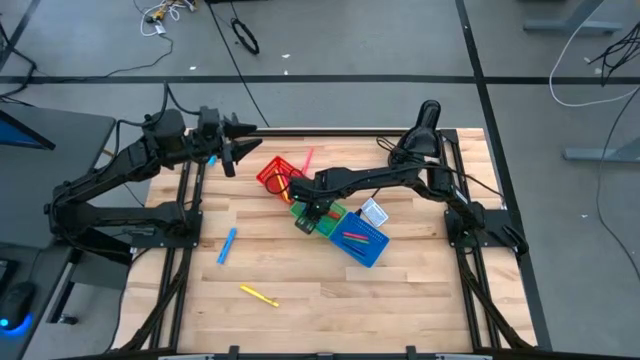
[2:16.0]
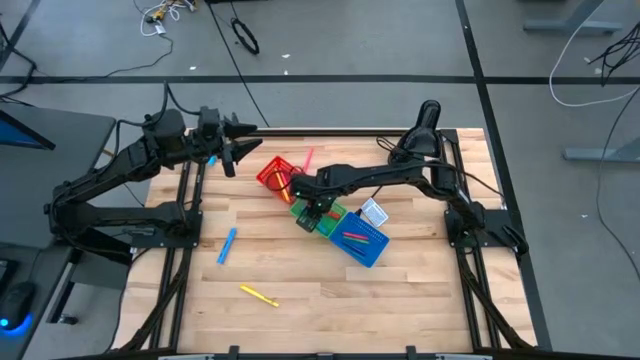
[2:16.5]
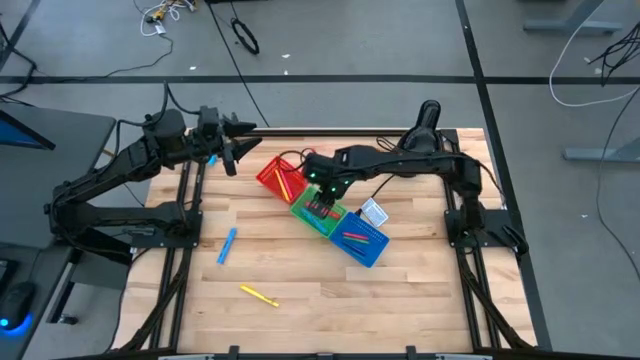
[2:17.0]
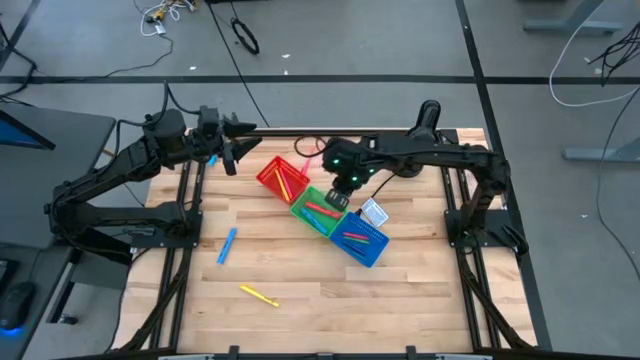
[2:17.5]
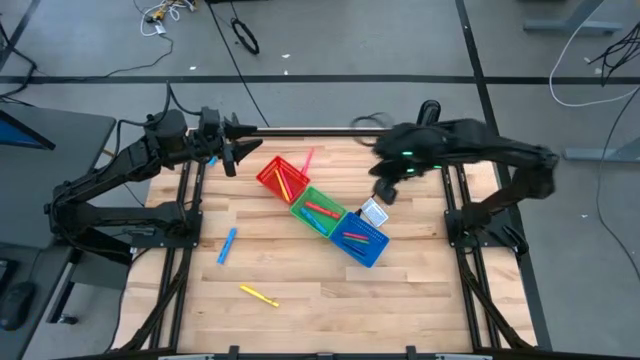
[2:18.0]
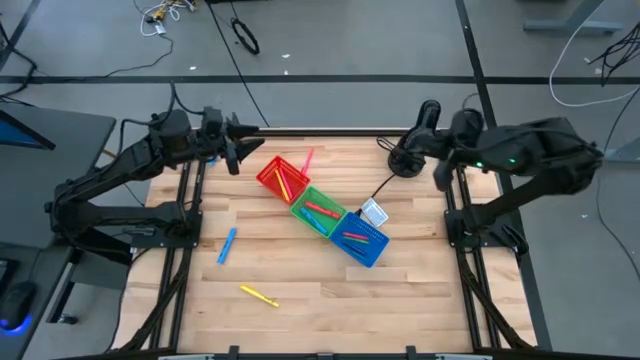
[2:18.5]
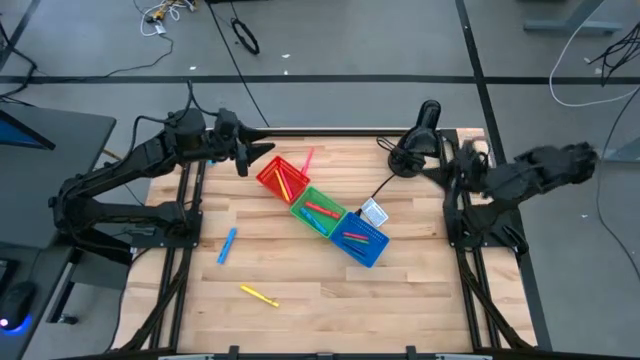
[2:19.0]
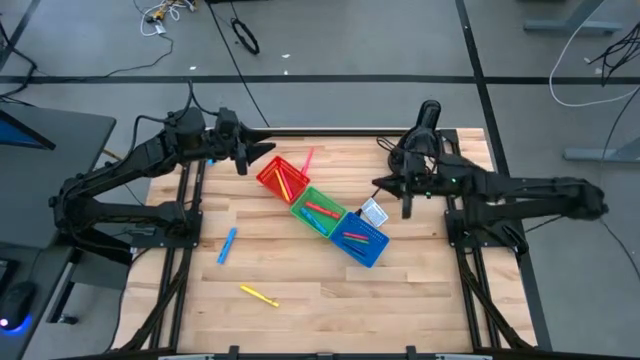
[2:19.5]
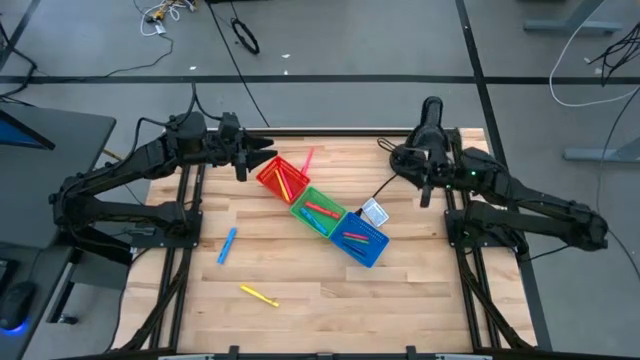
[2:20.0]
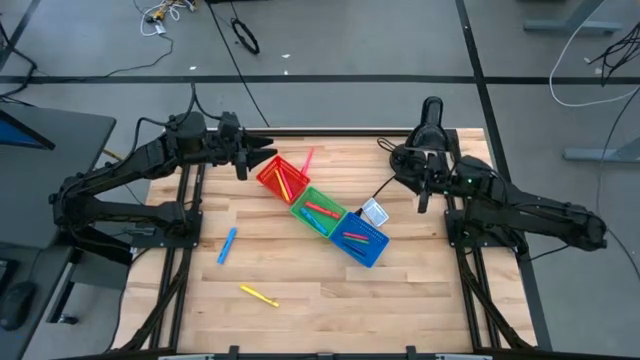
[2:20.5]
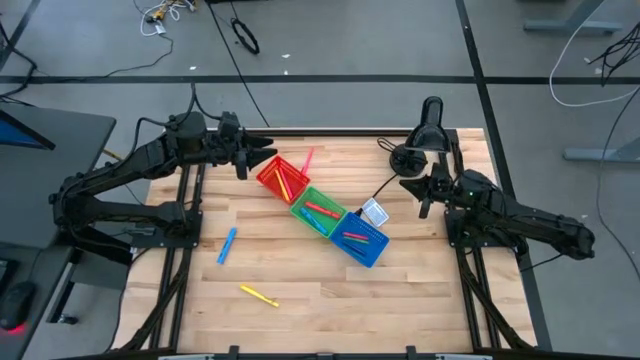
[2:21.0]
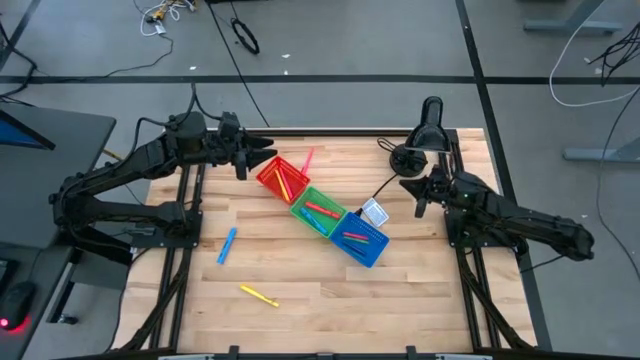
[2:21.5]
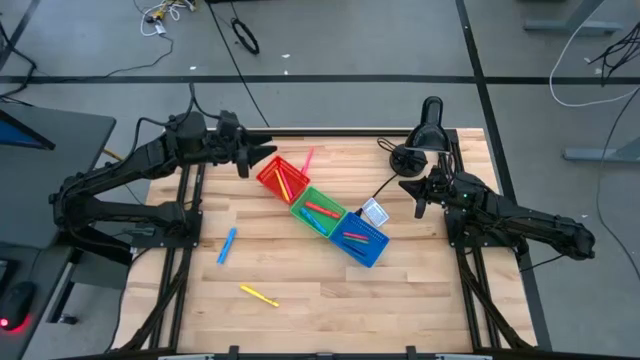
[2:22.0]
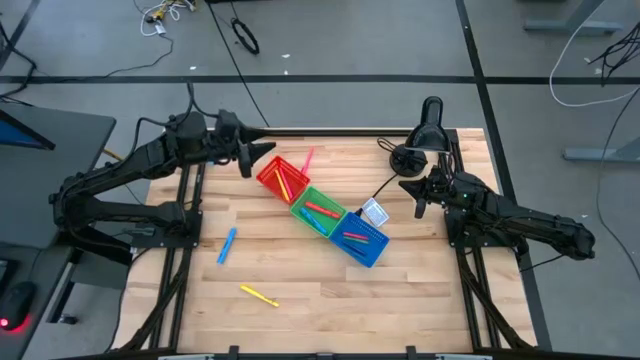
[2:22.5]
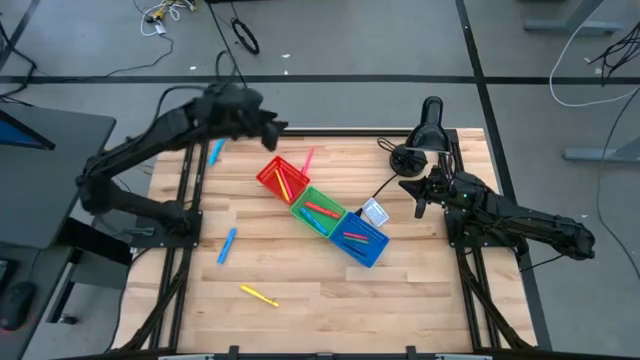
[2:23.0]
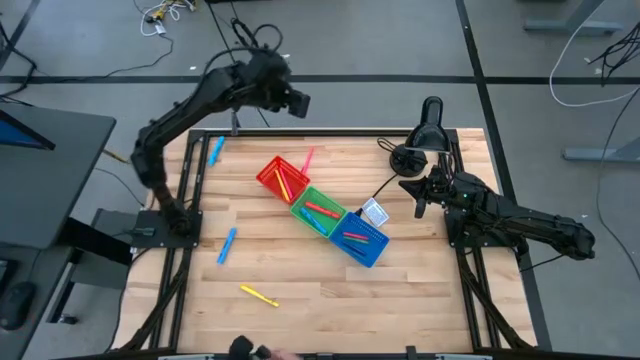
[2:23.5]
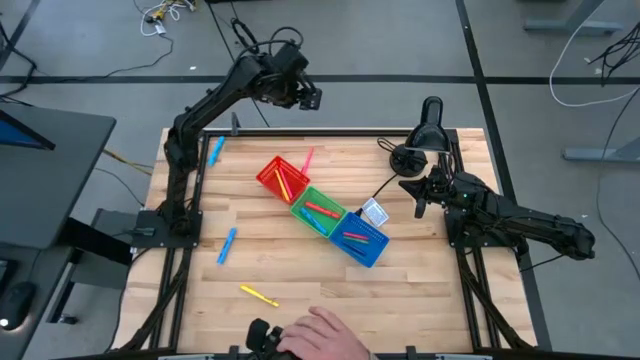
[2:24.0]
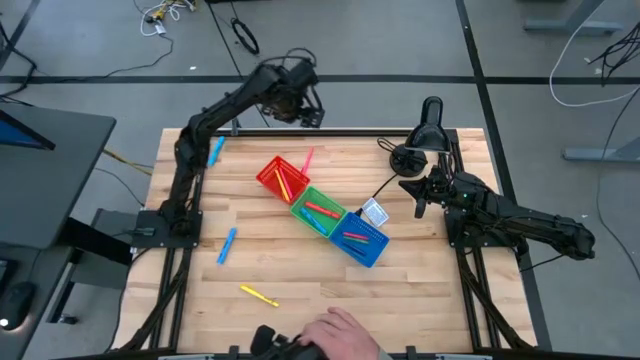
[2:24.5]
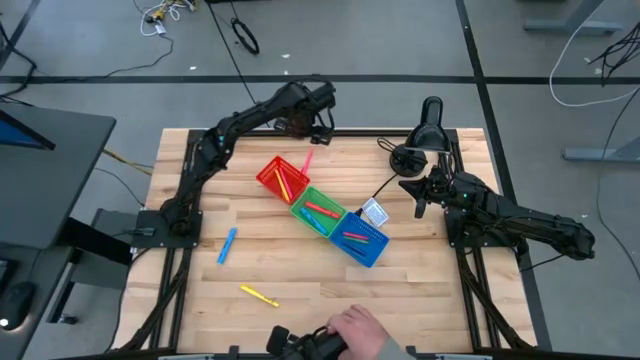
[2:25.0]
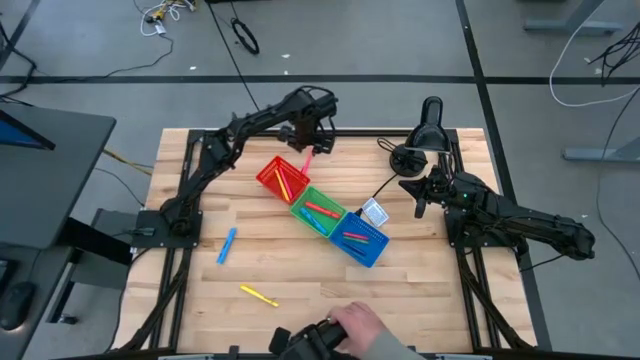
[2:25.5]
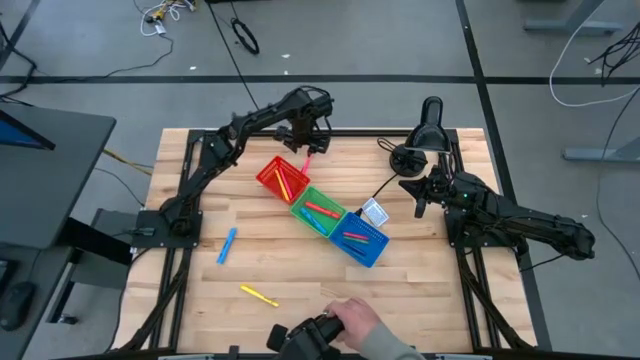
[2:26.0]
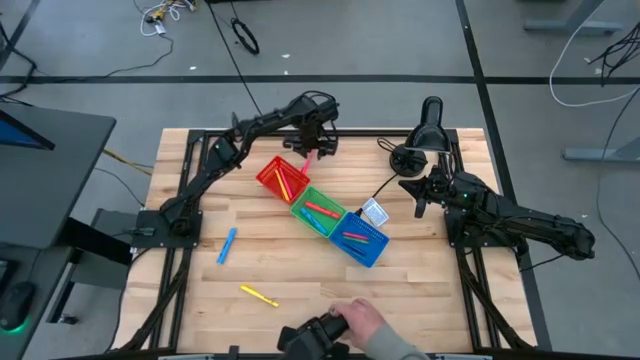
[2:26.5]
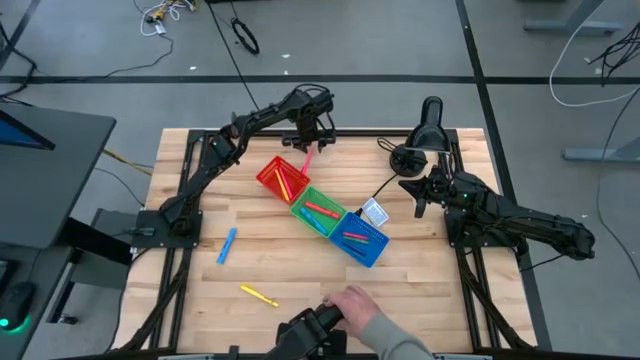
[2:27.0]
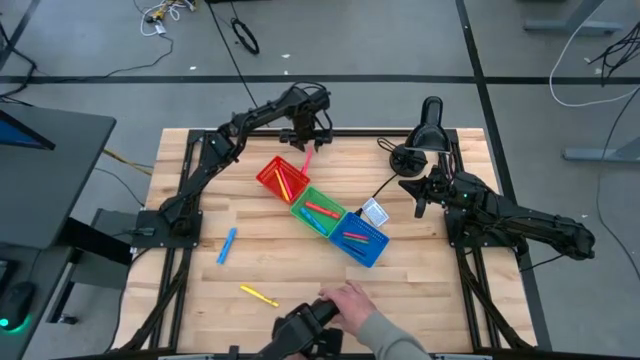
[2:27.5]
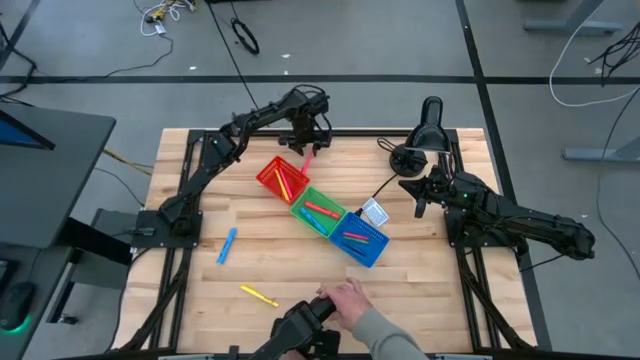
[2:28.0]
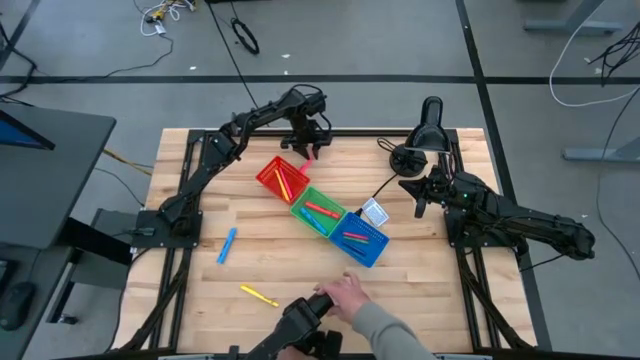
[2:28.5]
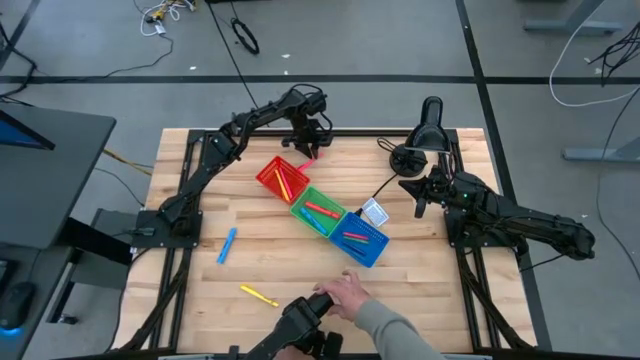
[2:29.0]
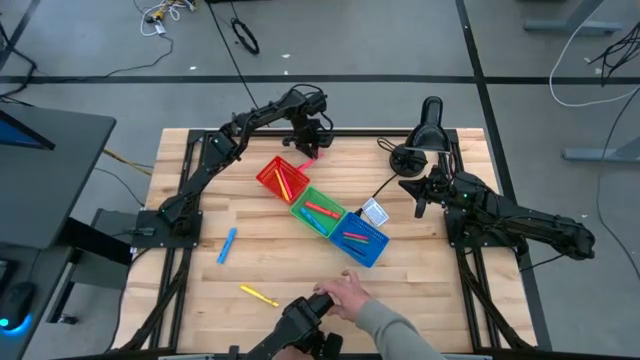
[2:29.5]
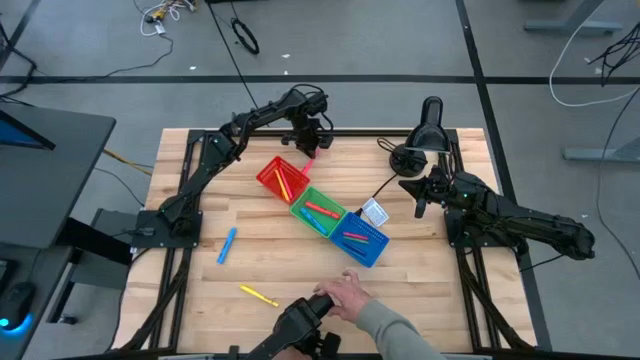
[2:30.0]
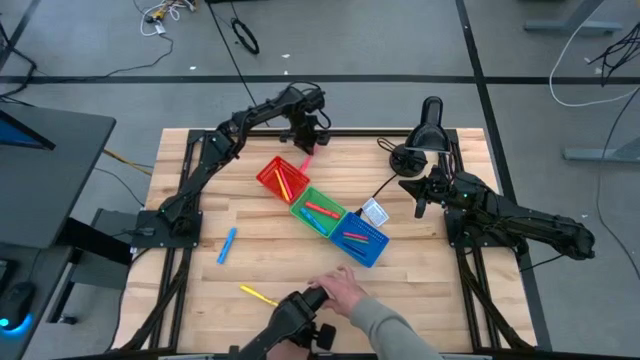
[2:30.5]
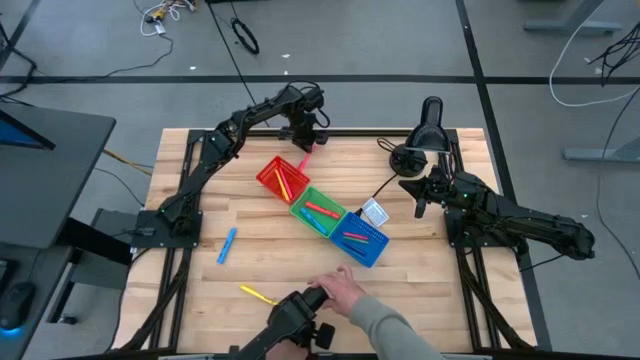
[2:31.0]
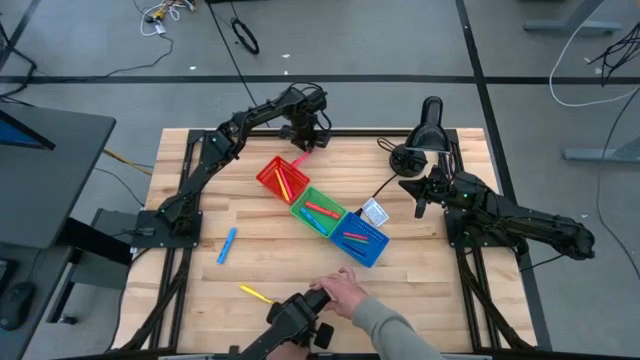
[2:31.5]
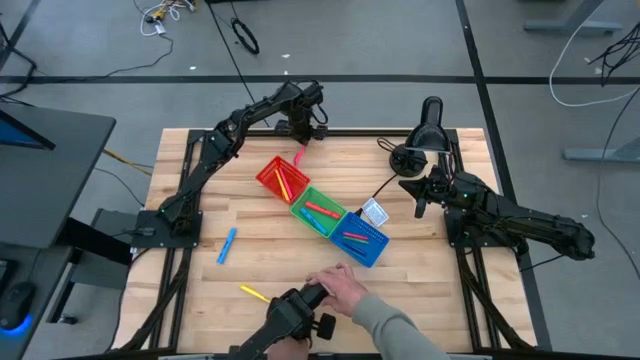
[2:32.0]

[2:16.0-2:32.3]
Task: Pick & Place Markers
Put the pink marker pen into the red bin

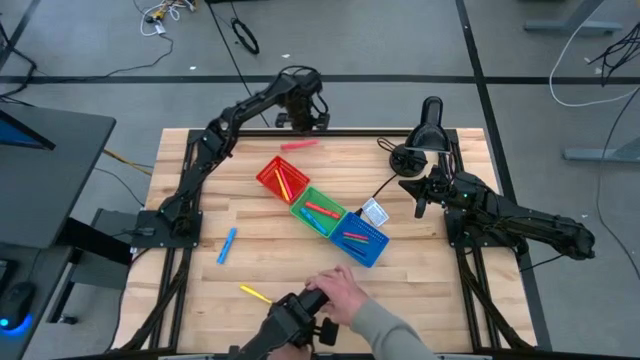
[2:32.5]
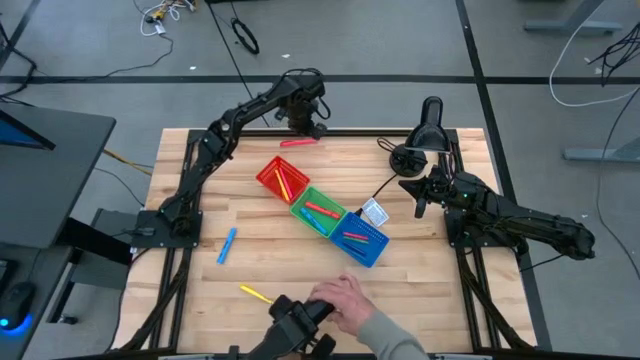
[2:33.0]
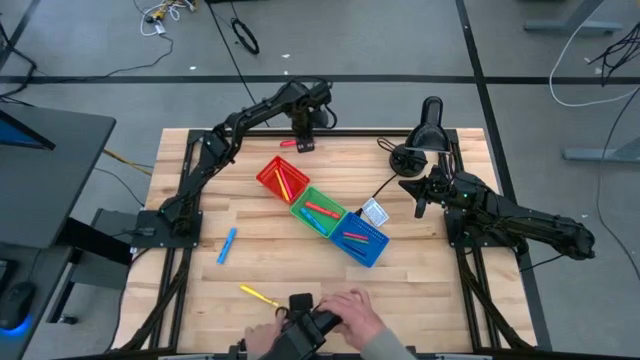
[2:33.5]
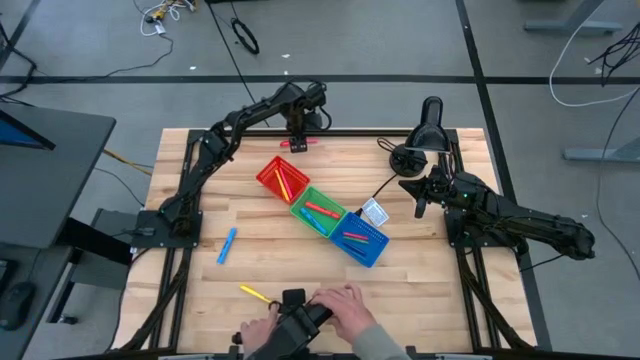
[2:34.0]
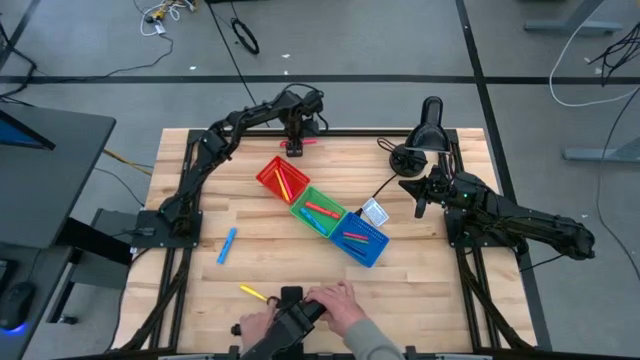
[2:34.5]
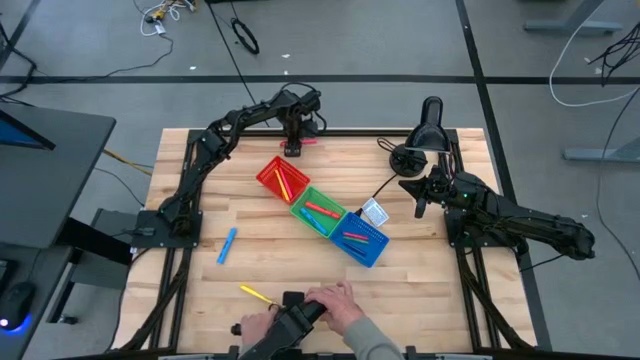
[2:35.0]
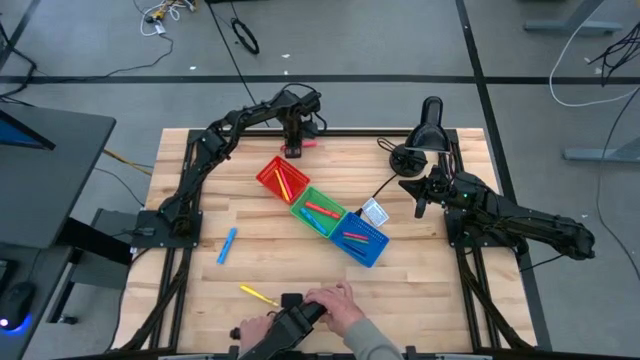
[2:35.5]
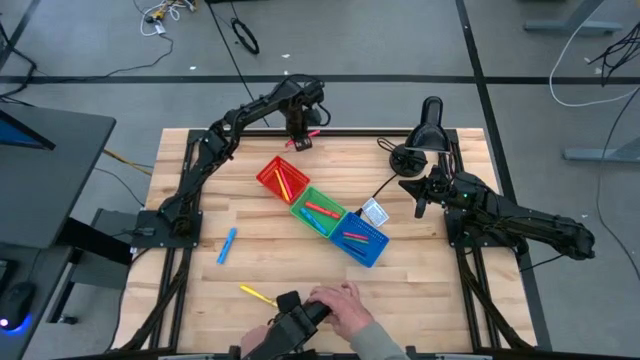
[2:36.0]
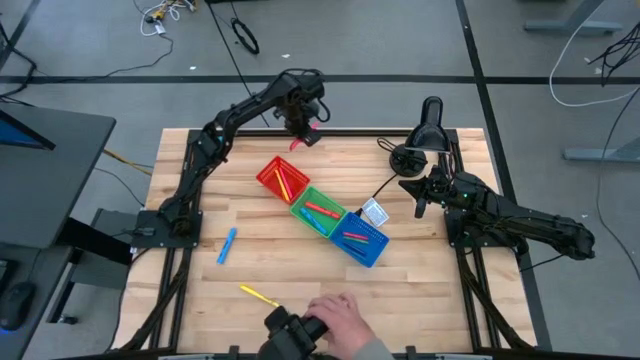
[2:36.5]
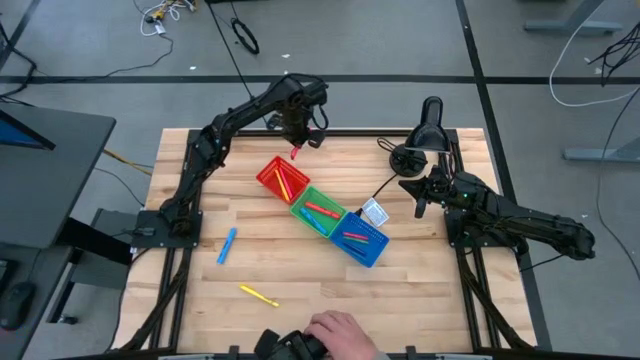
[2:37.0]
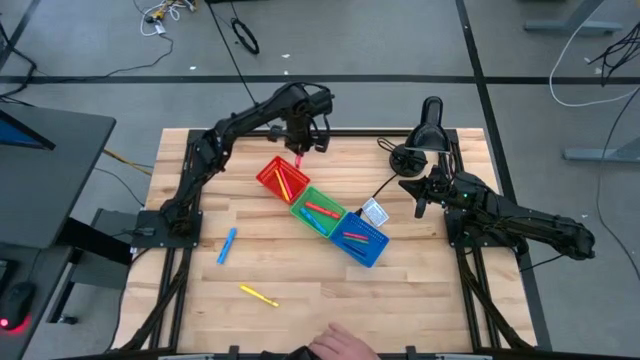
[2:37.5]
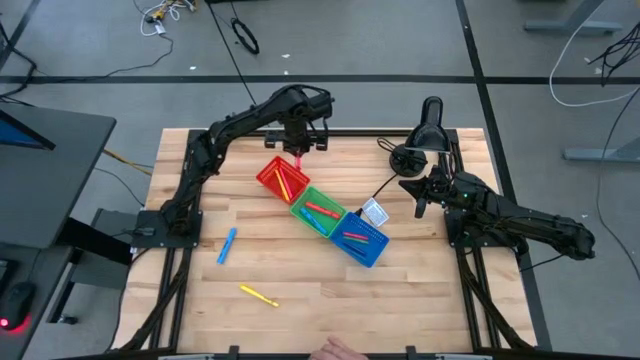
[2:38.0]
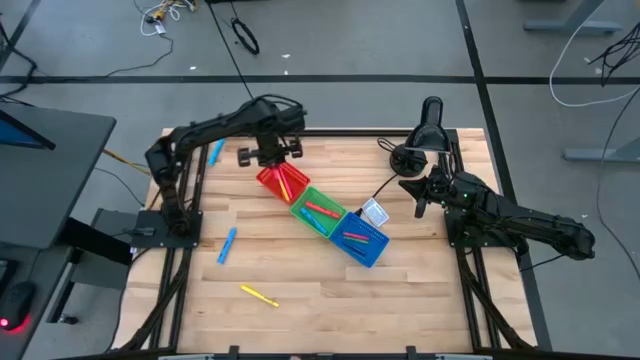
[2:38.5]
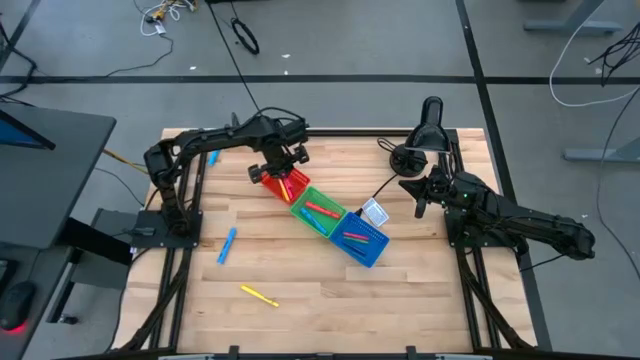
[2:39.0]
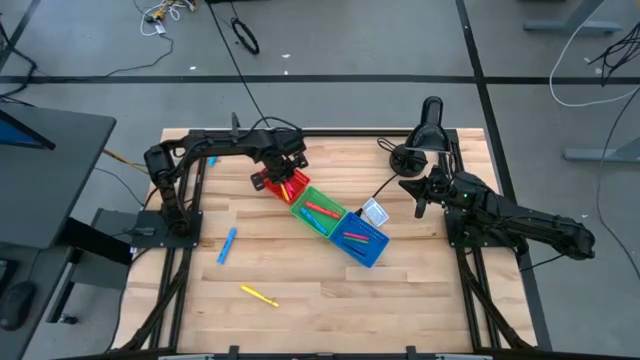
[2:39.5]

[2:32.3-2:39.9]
Put the pink marker pen into the red bin
